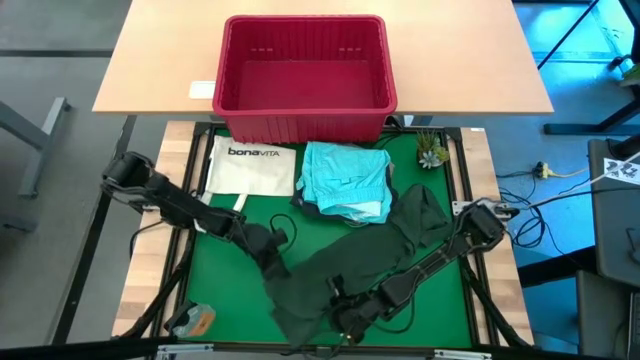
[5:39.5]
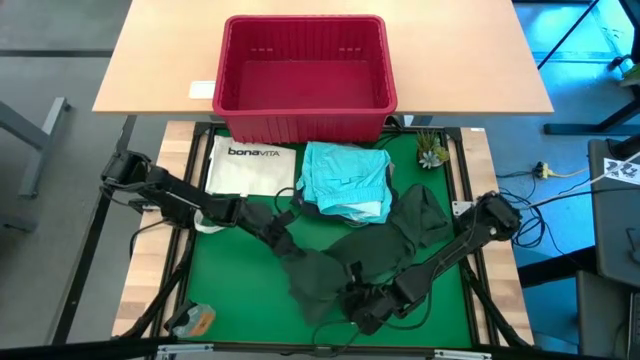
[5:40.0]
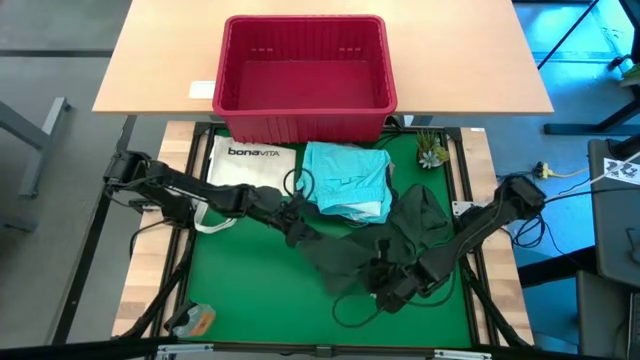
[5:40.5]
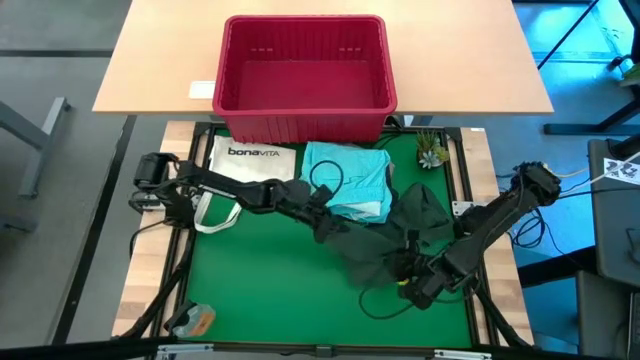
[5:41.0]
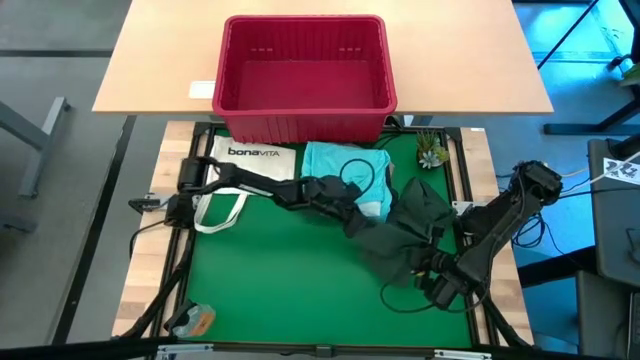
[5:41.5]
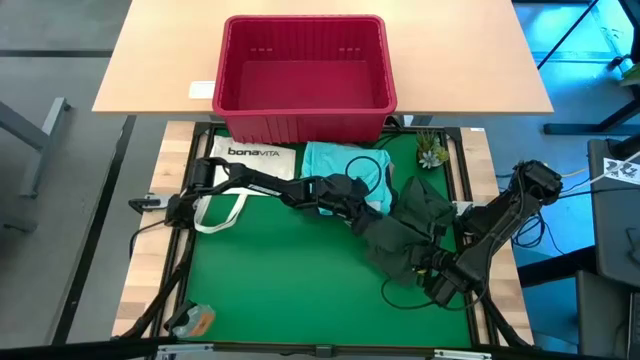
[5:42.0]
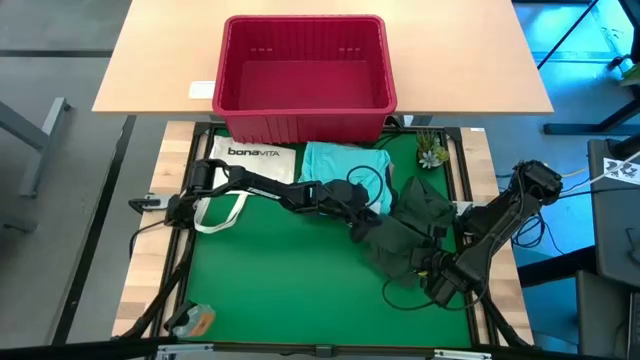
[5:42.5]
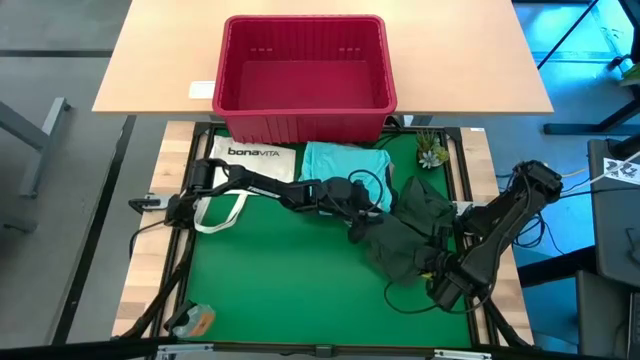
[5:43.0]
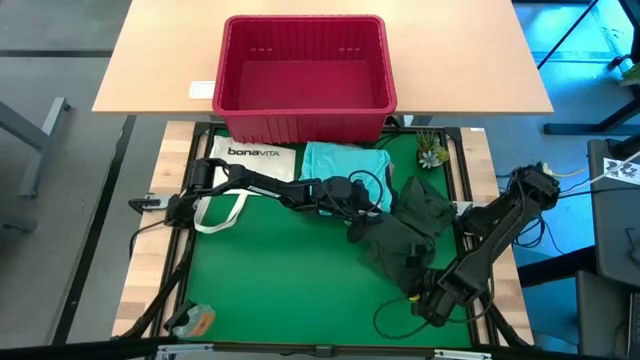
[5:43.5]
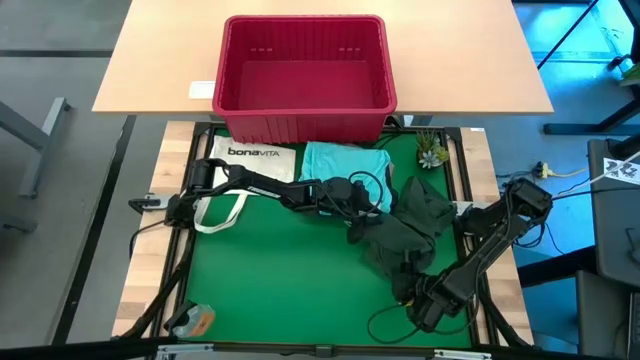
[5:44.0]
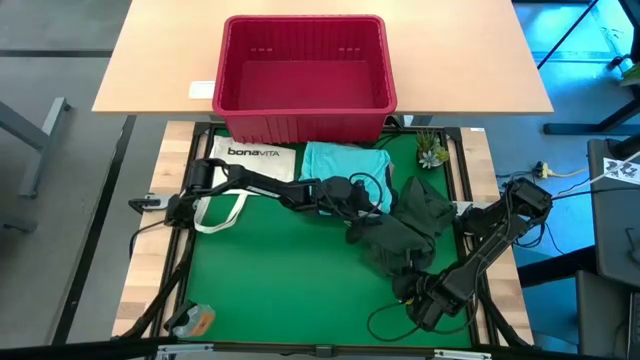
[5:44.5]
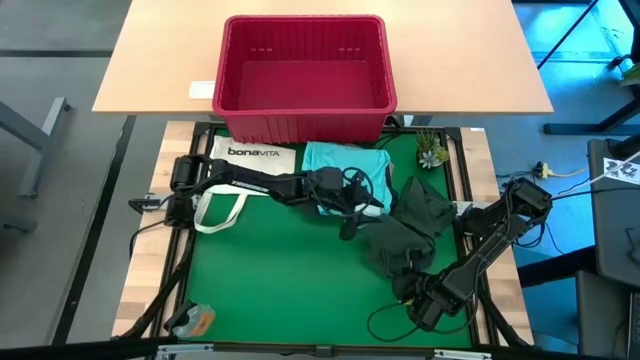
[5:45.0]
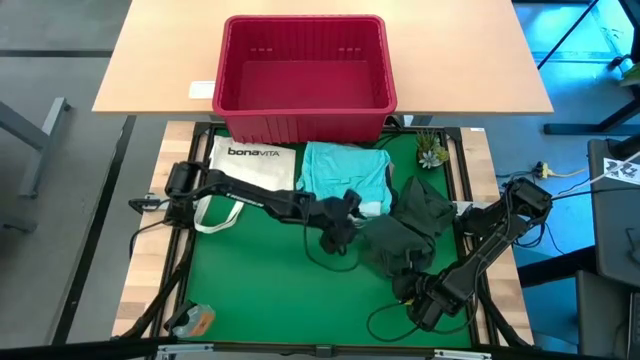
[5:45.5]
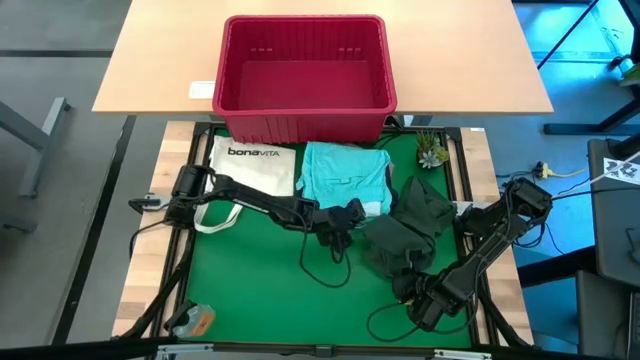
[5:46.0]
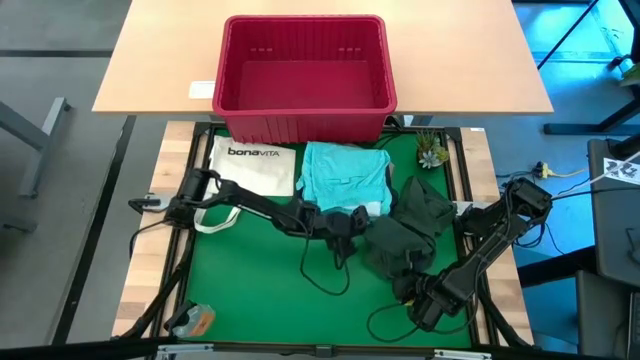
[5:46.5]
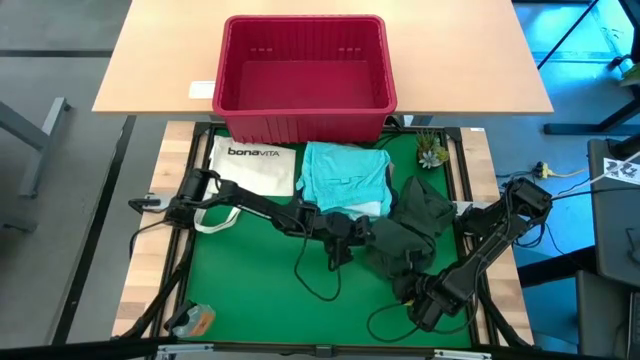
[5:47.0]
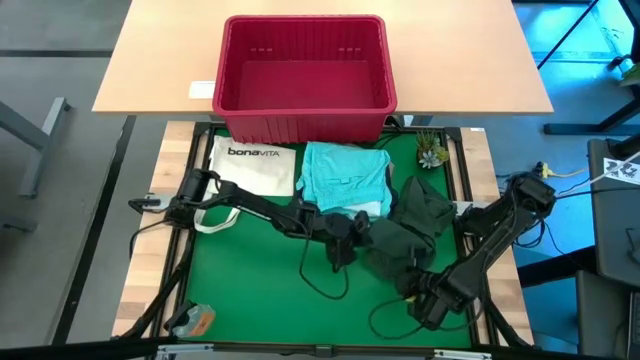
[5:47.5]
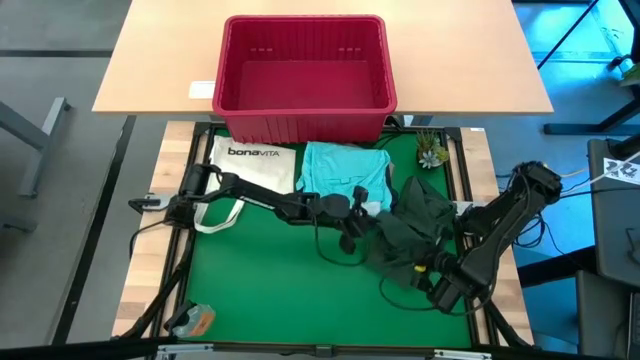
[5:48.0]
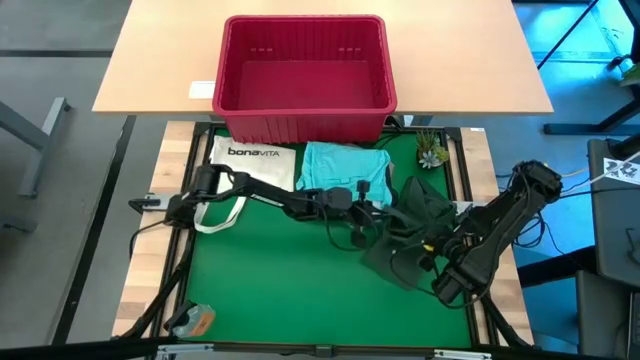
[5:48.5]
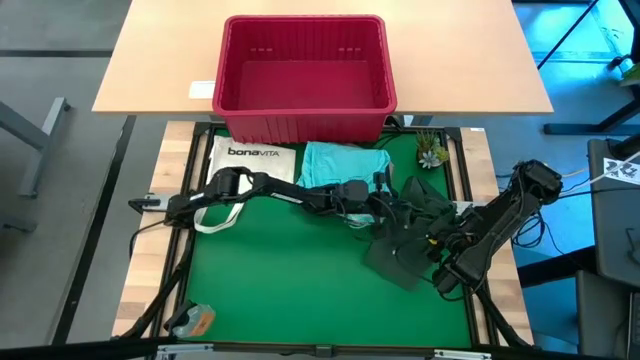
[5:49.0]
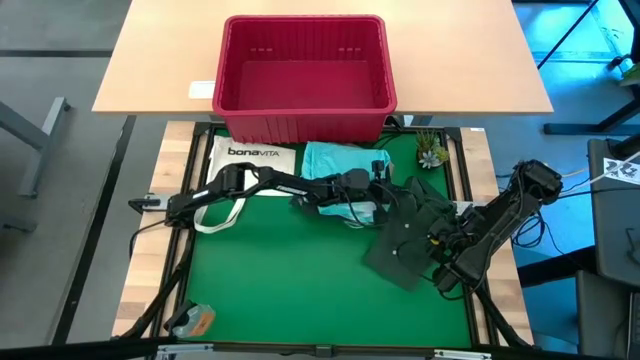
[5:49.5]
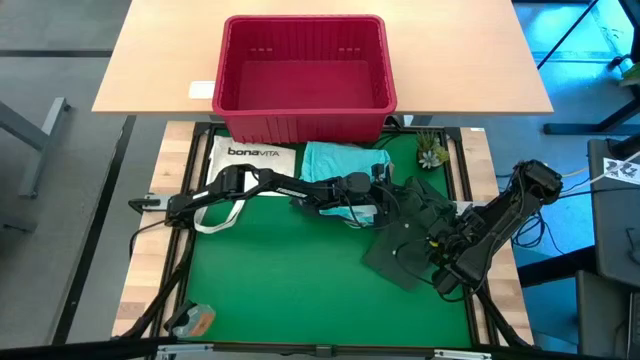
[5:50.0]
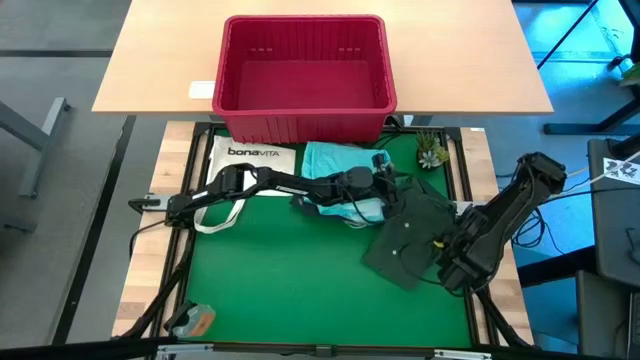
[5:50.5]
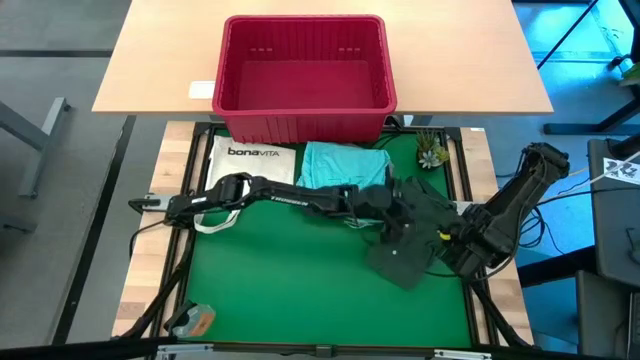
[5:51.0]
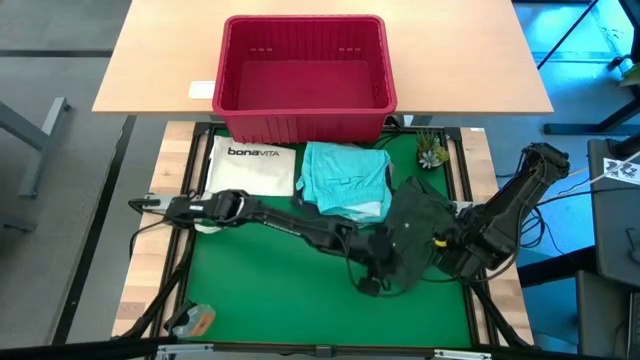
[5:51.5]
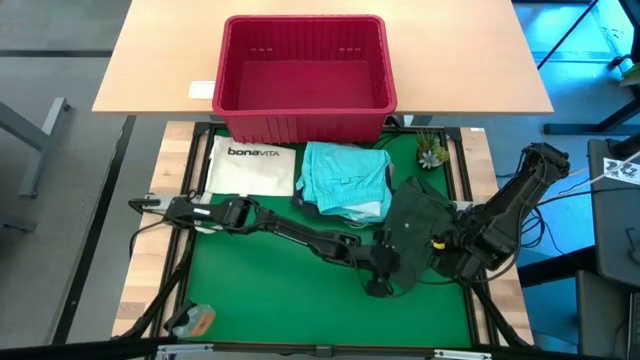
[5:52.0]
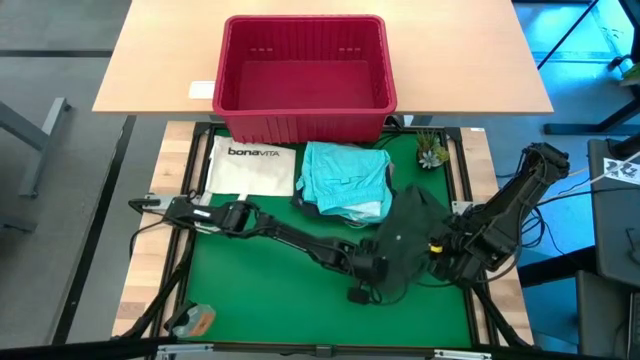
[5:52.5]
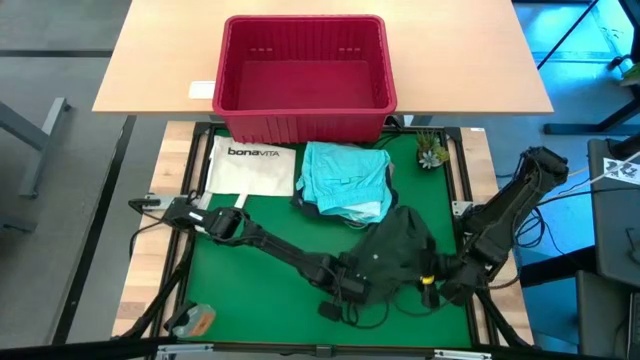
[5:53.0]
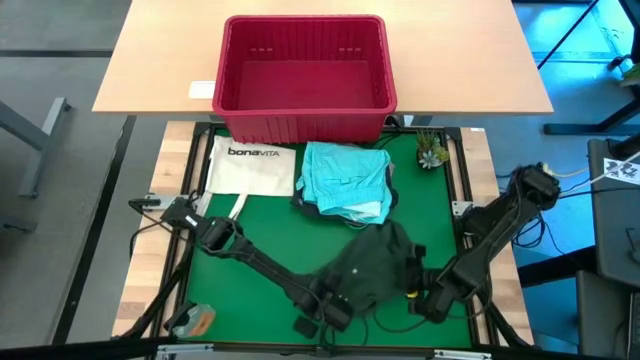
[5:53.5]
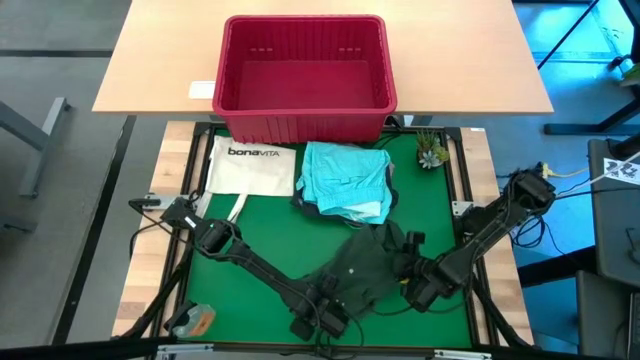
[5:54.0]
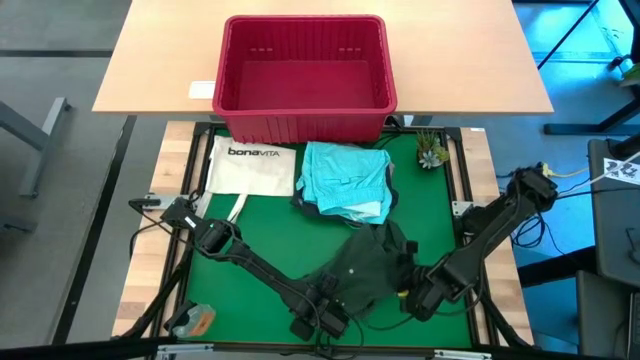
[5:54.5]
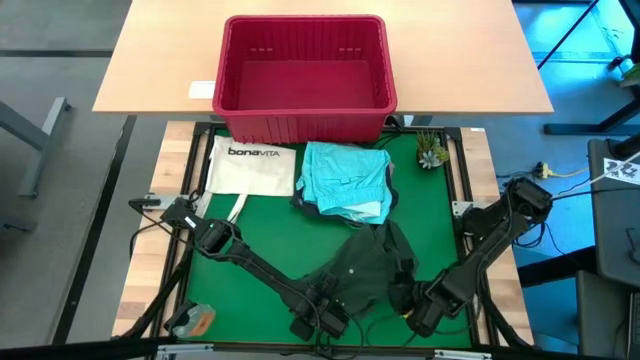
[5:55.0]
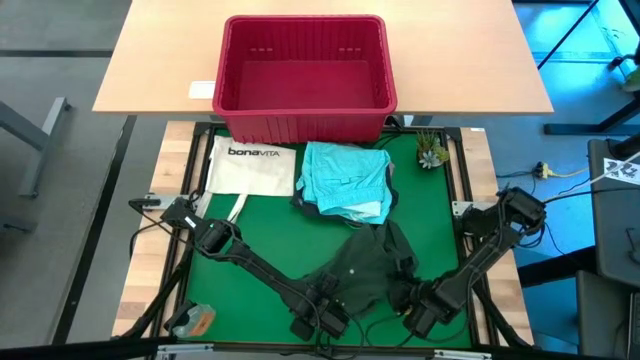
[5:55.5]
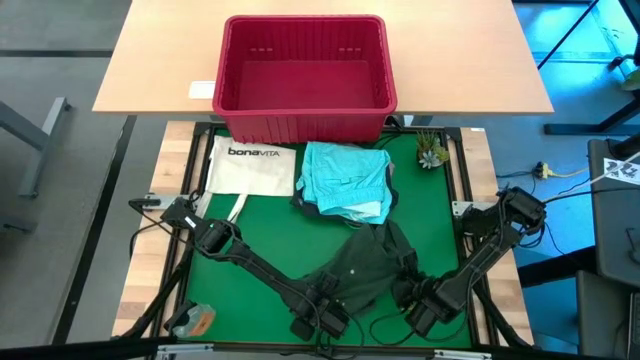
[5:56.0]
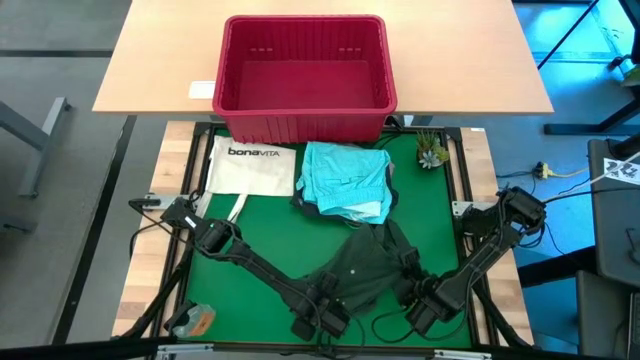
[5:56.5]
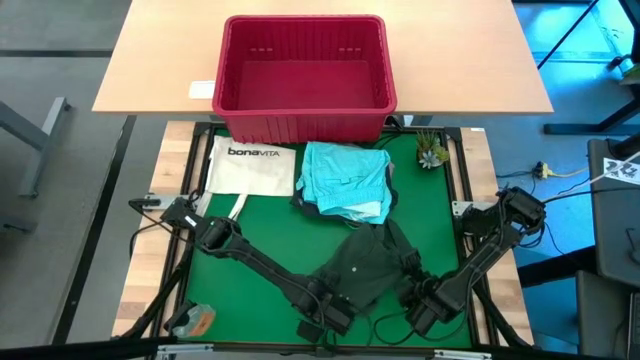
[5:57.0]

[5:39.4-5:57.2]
Task: Fold Laundry from Bin
Fold the green polo shirt from the red laundry bin

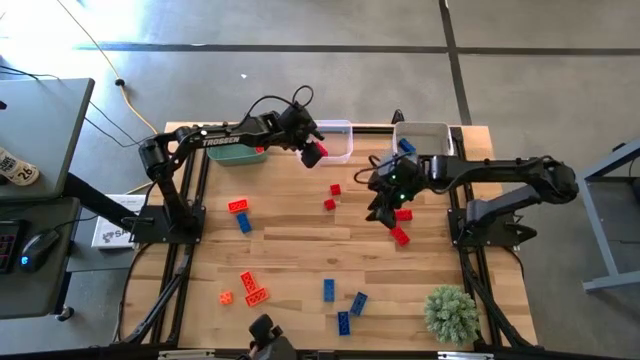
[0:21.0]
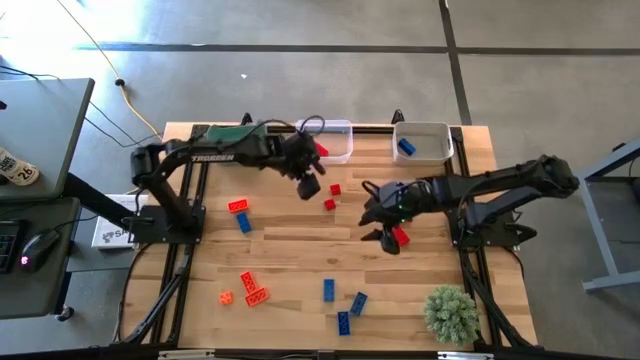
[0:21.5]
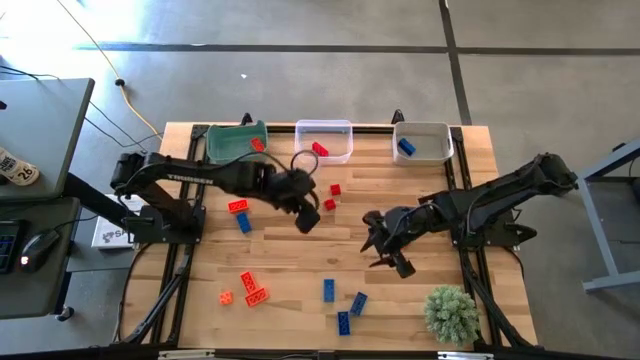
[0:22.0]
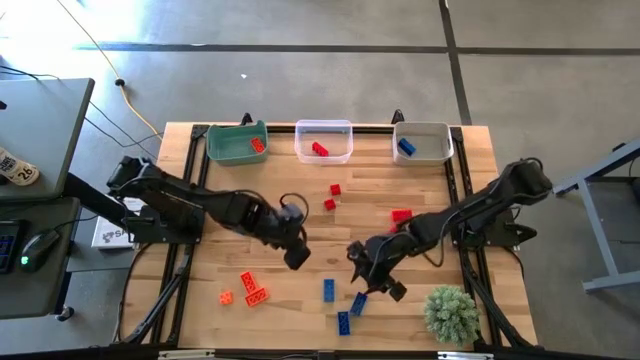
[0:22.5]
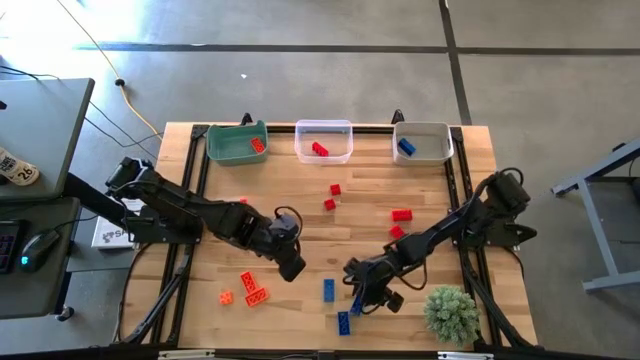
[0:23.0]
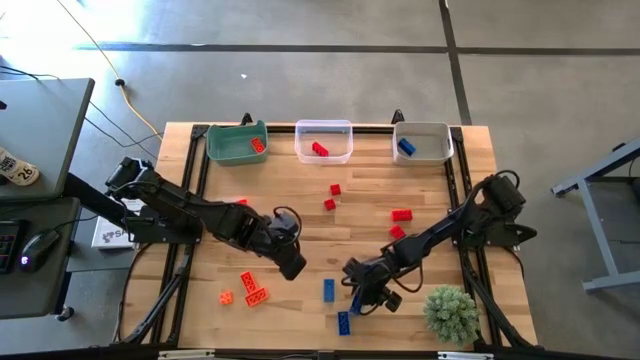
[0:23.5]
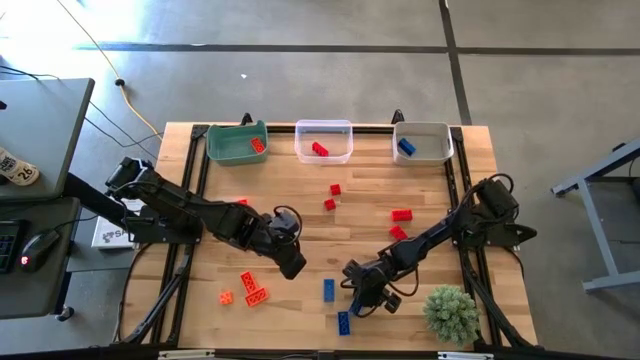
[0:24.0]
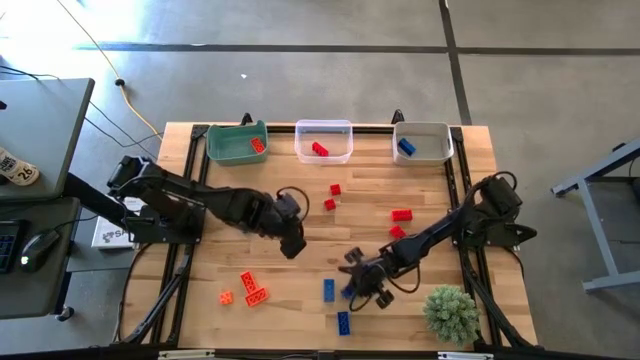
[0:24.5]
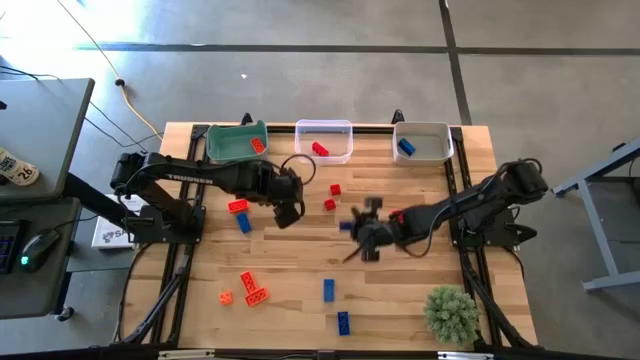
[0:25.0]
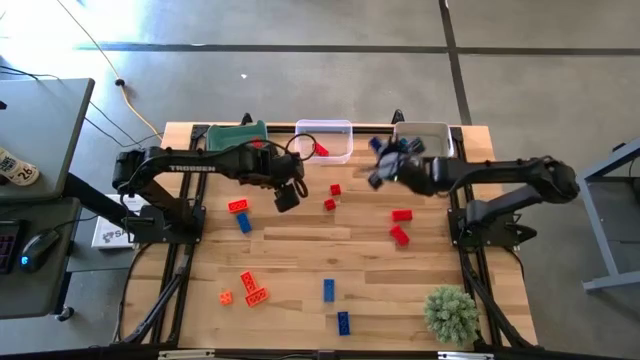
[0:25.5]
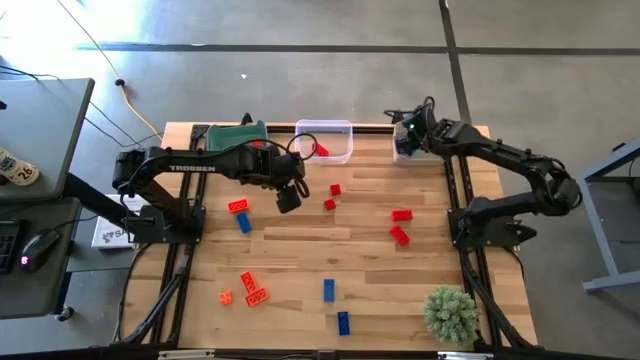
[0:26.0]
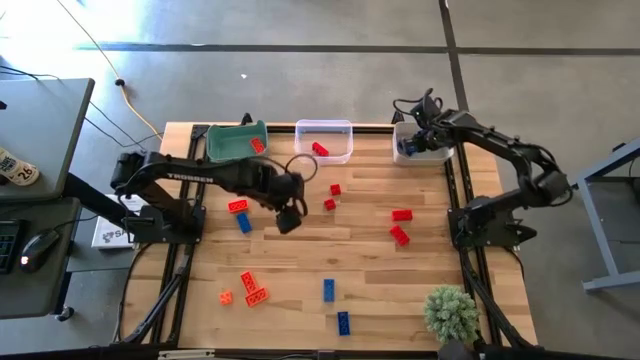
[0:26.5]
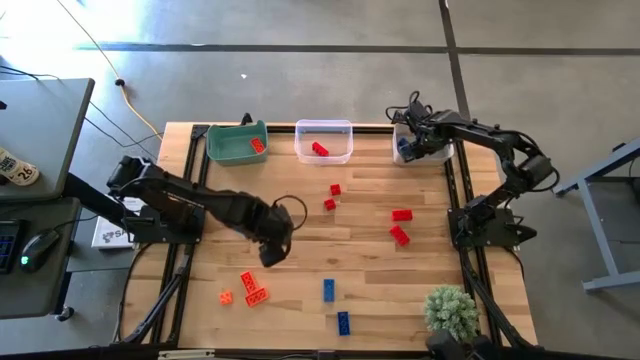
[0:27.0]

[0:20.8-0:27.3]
Task: Sort & place blocks by color
Put the blue game piece into the white bin
